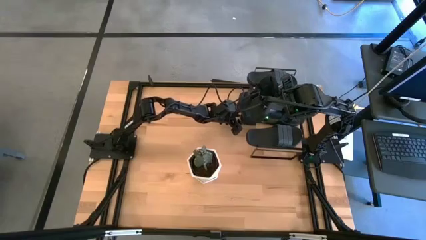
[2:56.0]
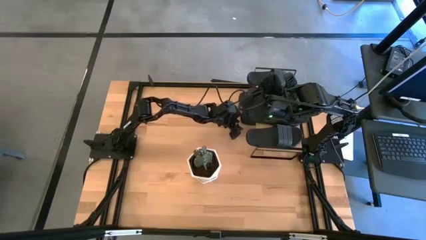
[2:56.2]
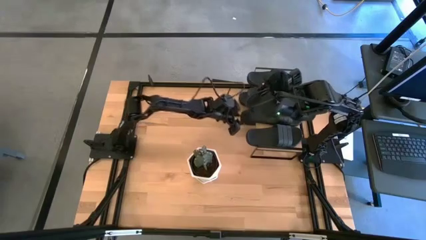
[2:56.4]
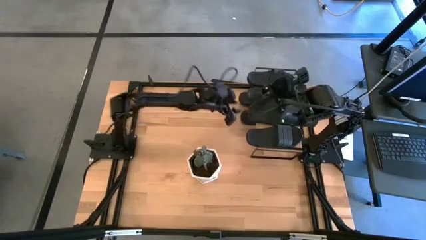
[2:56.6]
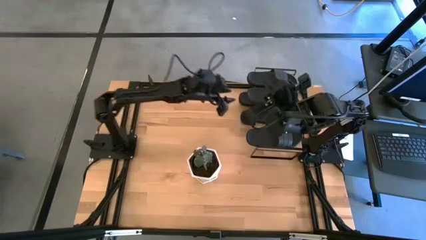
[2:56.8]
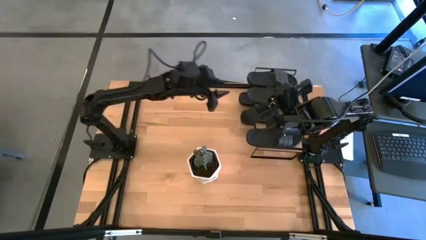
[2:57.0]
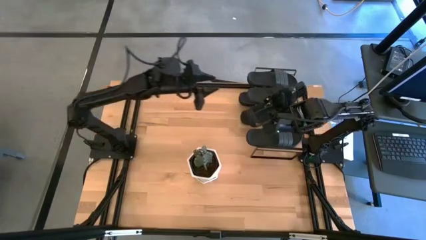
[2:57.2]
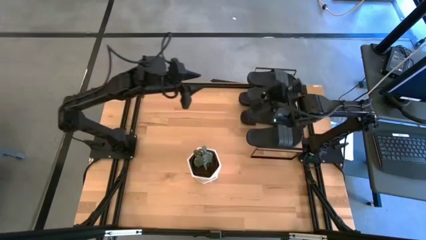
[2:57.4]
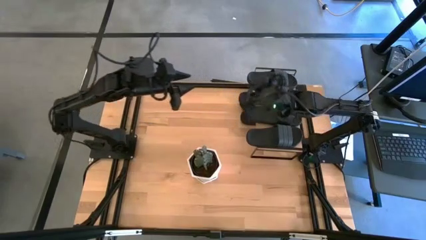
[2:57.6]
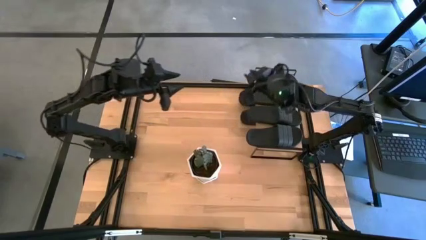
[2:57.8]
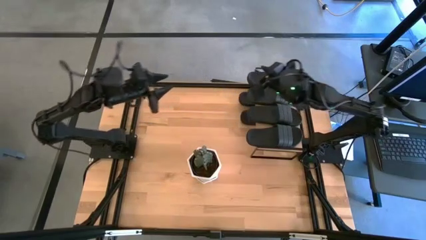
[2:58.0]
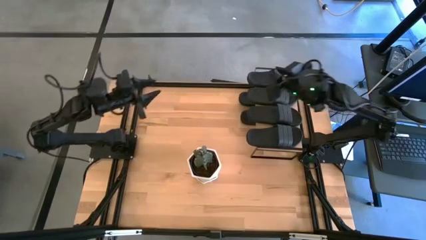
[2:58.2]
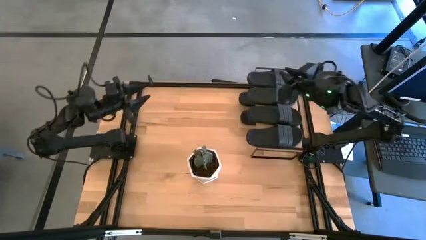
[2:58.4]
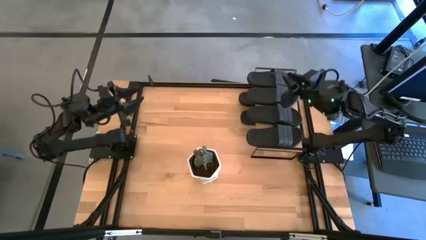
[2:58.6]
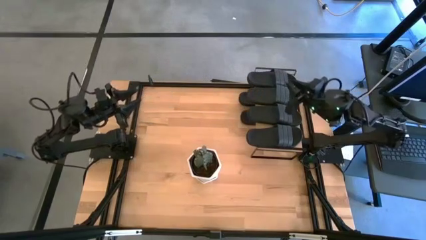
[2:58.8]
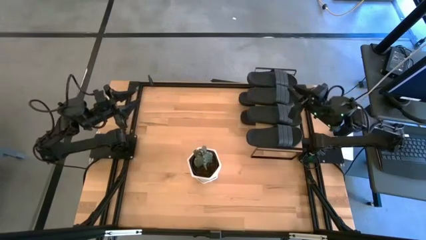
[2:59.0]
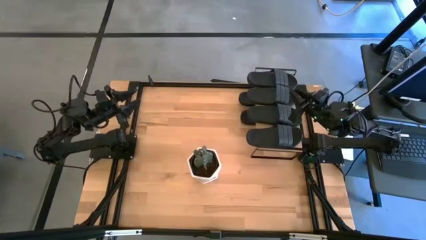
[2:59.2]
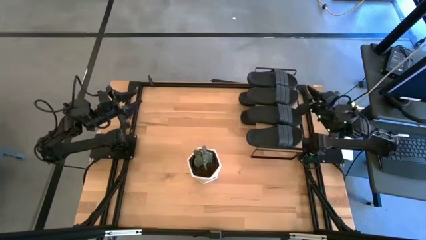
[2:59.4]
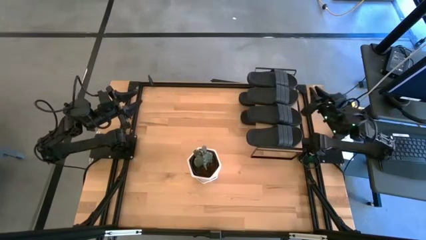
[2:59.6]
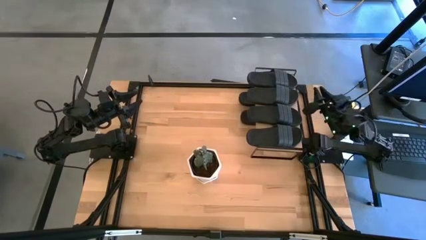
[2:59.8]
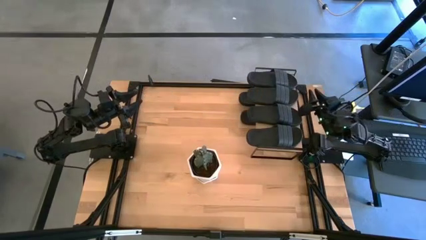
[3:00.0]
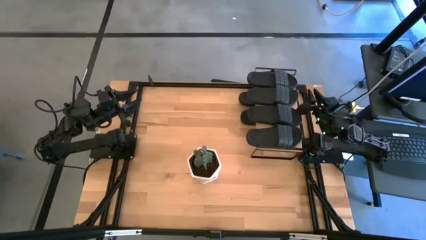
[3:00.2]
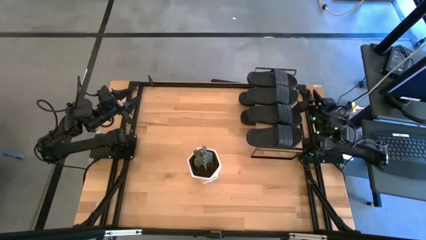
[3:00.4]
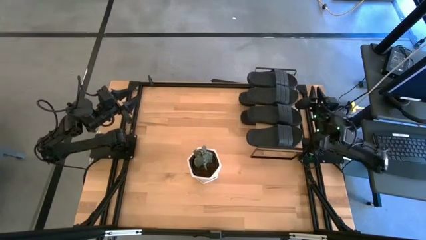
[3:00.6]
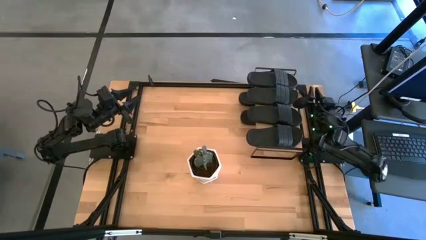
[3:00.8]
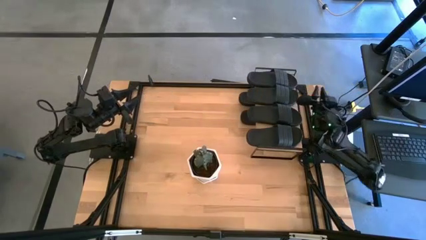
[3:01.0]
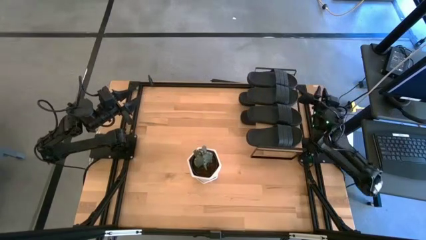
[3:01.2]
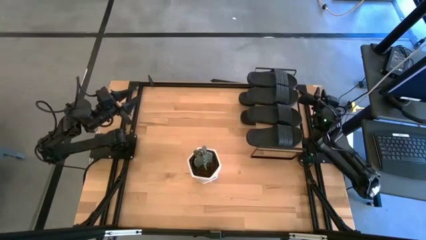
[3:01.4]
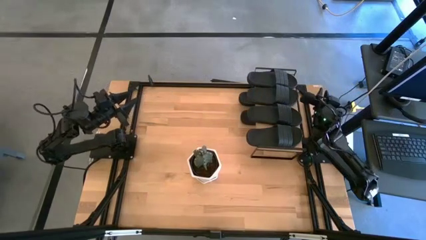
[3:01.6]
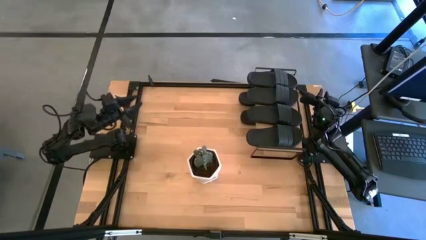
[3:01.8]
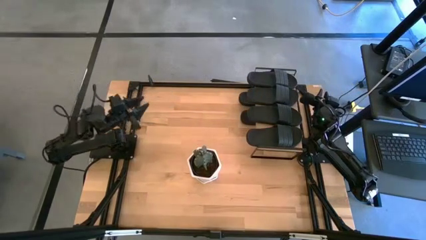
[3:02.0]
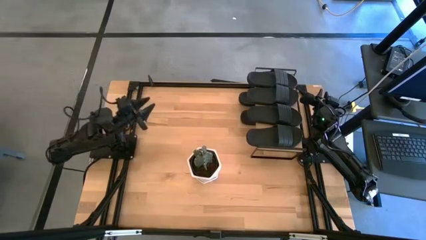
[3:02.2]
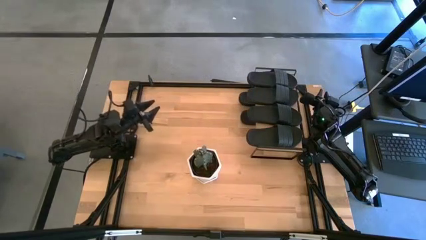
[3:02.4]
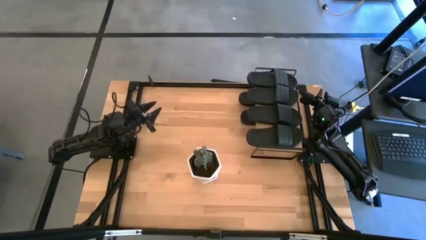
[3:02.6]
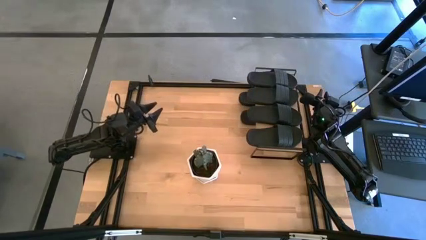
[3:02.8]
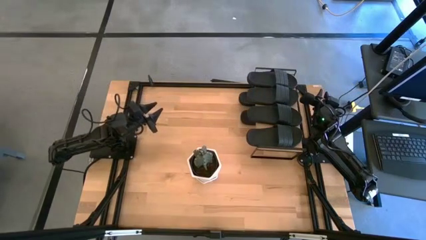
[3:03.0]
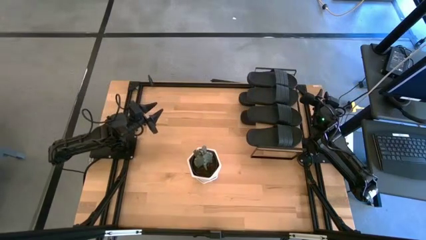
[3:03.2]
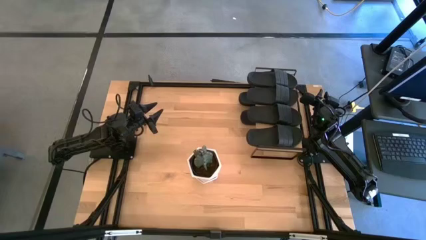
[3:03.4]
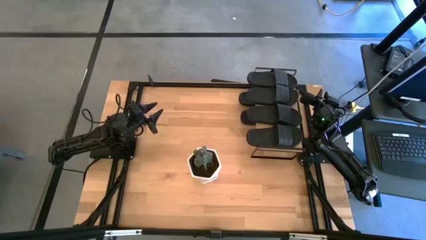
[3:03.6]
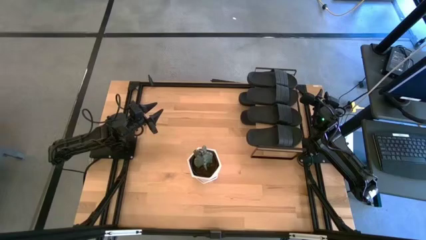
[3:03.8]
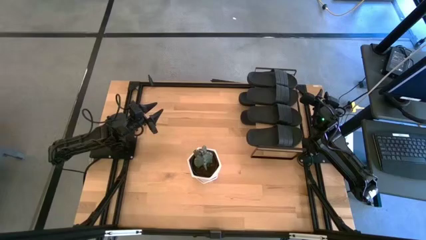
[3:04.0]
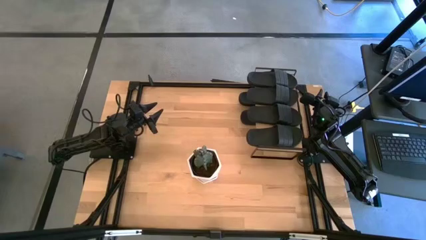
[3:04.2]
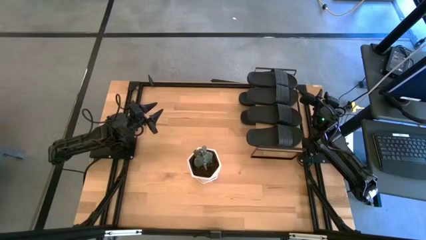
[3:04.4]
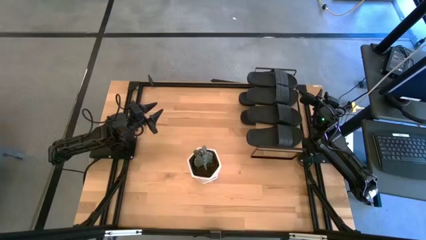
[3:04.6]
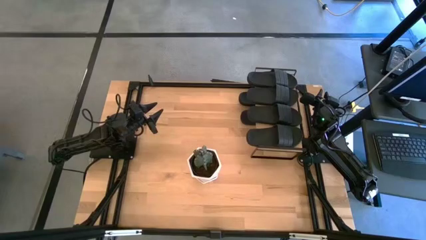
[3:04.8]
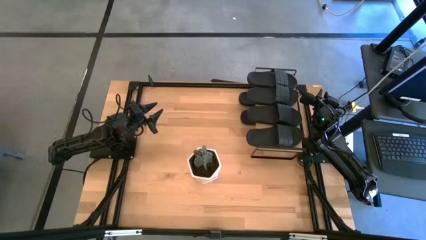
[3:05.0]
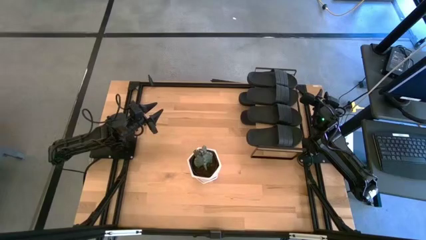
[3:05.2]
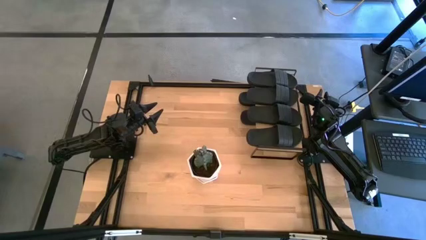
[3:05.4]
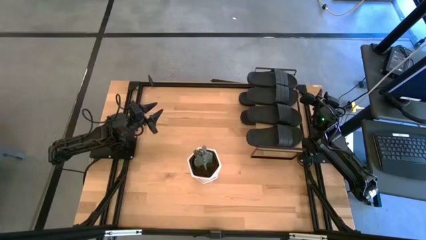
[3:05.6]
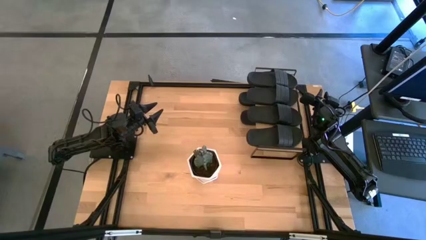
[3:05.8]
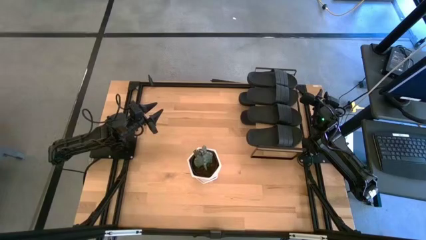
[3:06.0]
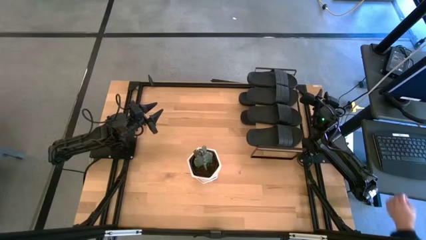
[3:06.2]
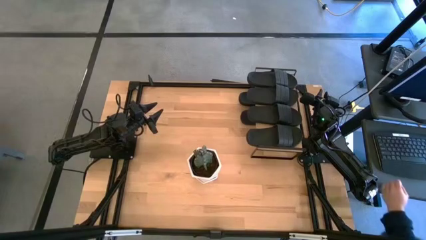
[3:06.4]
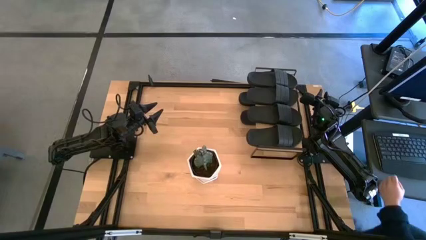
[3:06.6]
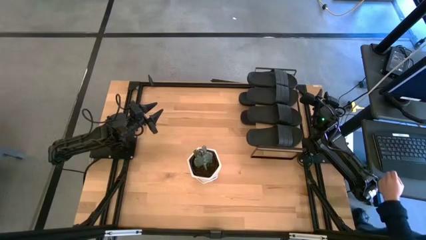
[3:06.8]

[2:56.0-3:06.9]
Task: Pick and place slides into the shelf
Return to Home Position
